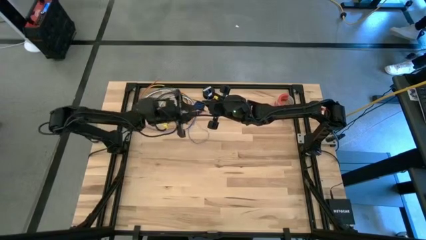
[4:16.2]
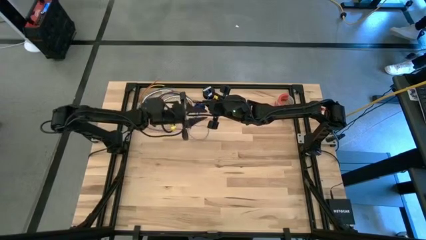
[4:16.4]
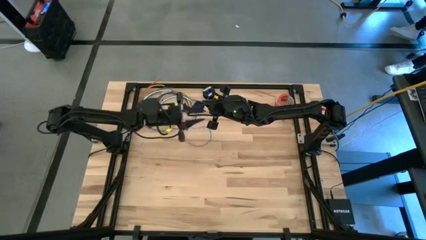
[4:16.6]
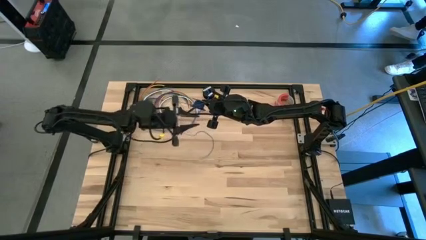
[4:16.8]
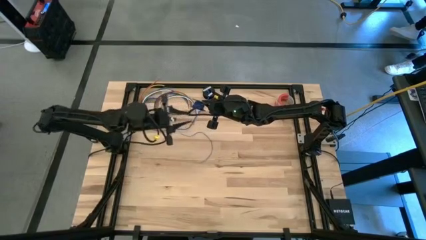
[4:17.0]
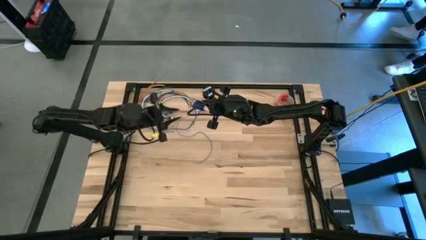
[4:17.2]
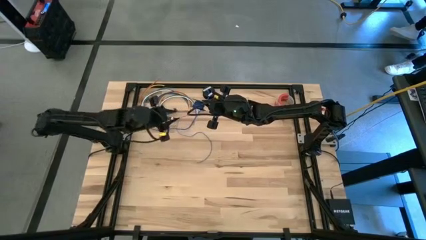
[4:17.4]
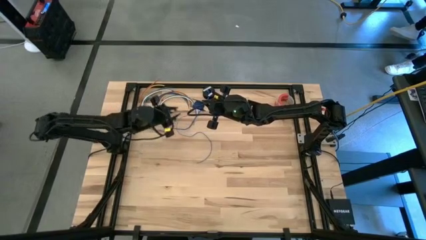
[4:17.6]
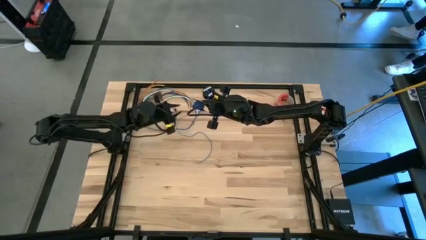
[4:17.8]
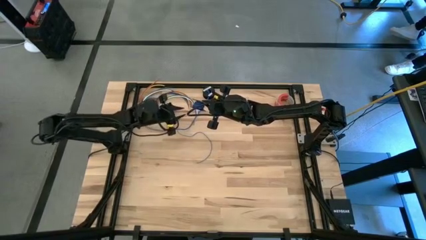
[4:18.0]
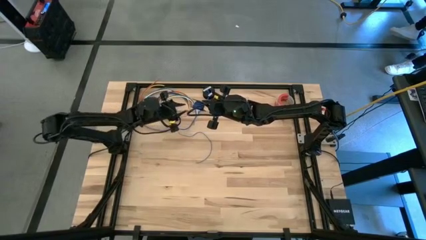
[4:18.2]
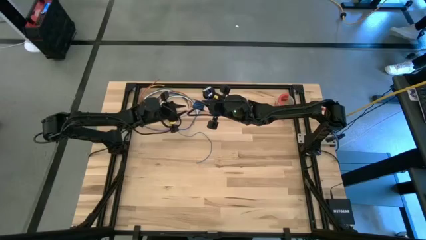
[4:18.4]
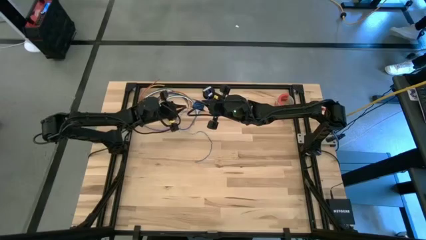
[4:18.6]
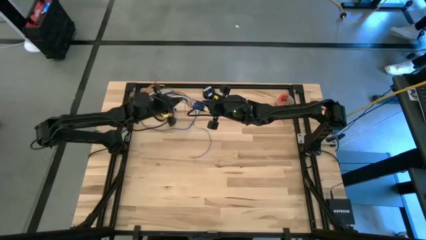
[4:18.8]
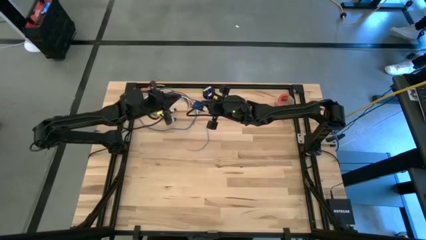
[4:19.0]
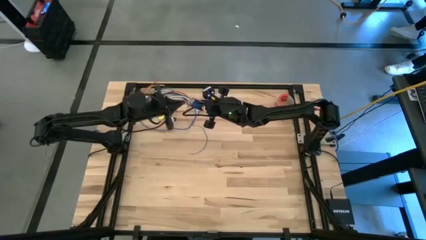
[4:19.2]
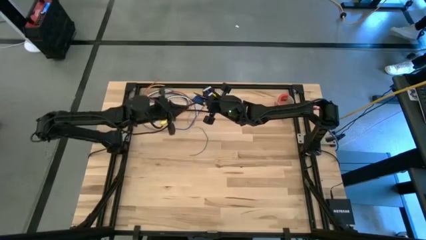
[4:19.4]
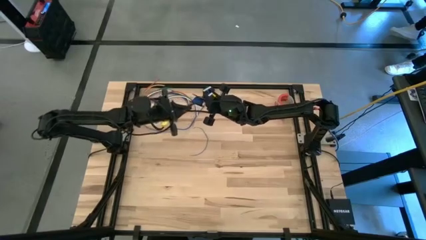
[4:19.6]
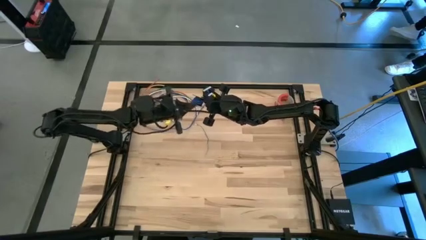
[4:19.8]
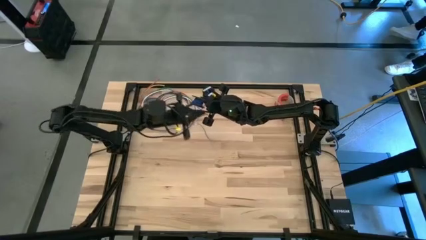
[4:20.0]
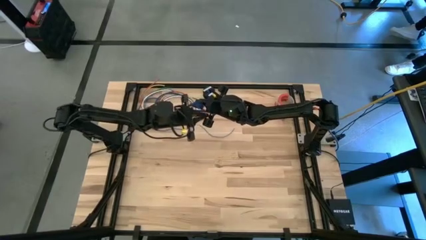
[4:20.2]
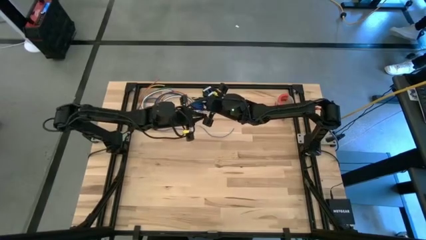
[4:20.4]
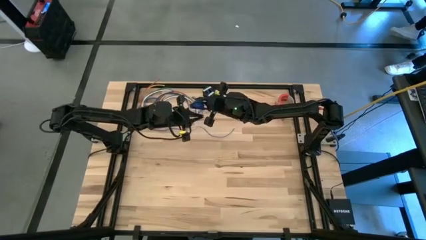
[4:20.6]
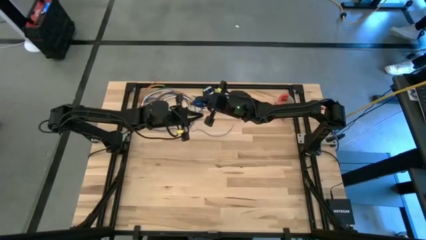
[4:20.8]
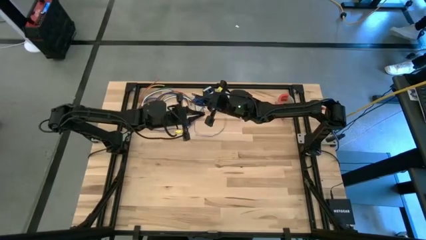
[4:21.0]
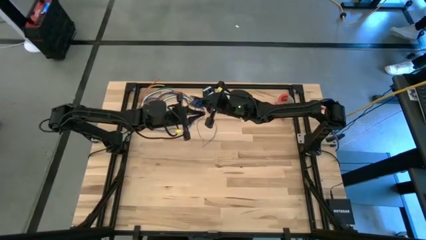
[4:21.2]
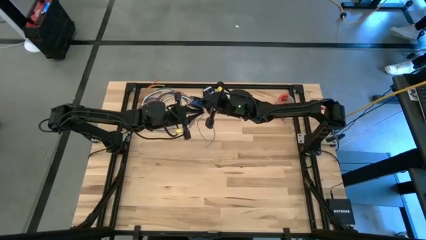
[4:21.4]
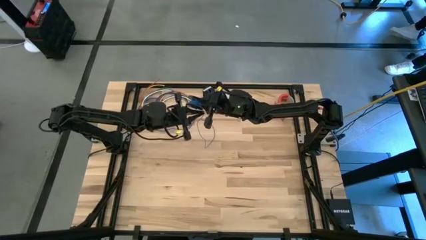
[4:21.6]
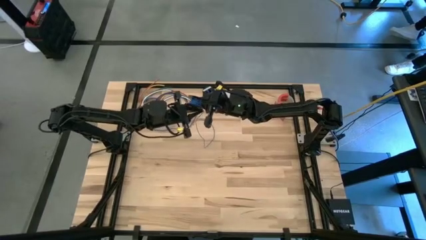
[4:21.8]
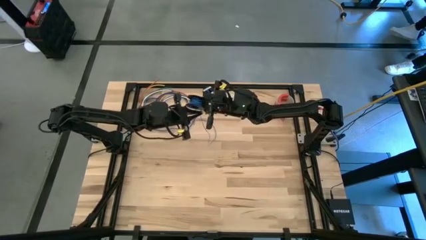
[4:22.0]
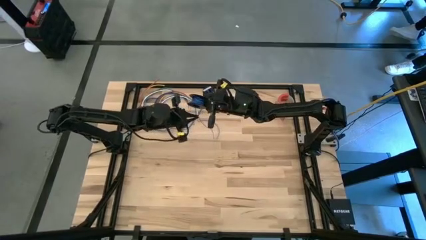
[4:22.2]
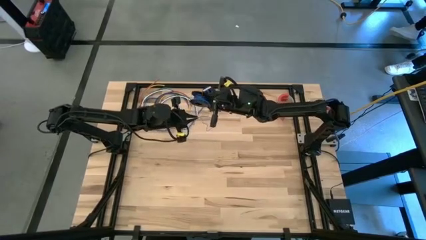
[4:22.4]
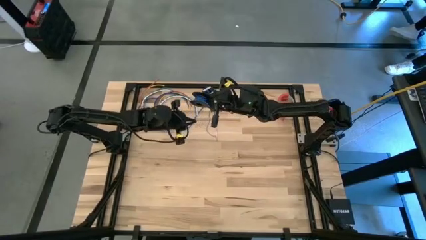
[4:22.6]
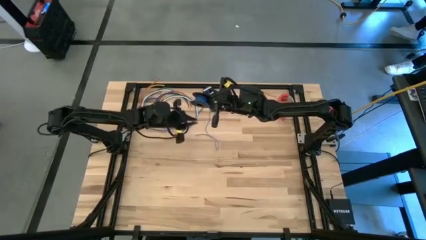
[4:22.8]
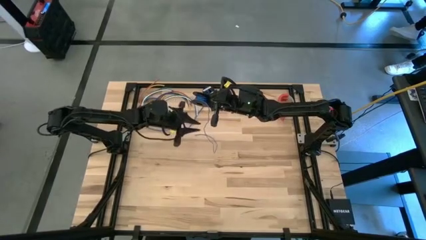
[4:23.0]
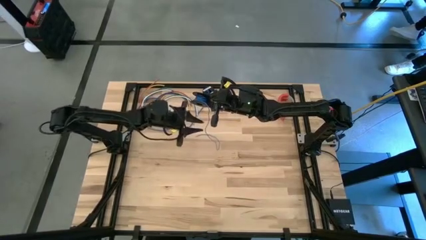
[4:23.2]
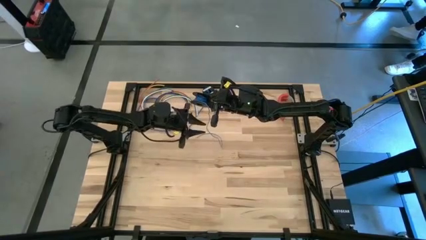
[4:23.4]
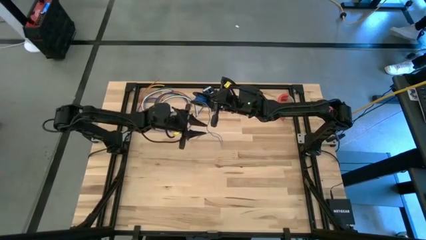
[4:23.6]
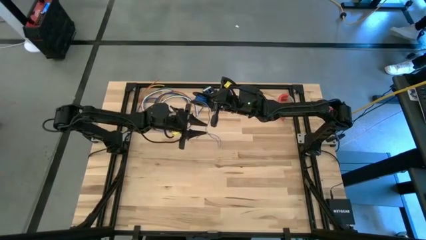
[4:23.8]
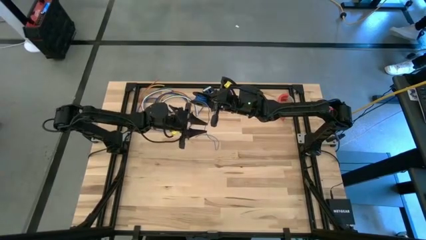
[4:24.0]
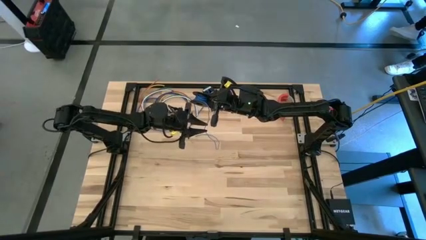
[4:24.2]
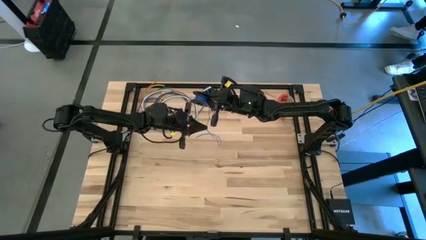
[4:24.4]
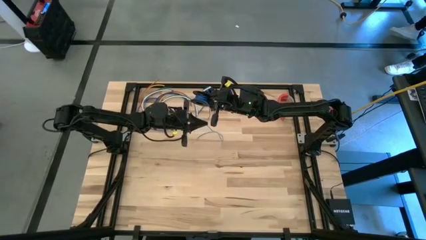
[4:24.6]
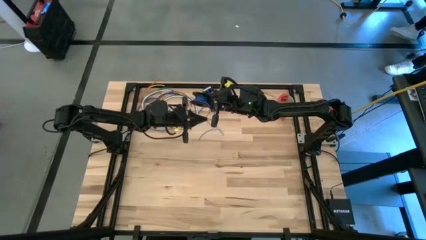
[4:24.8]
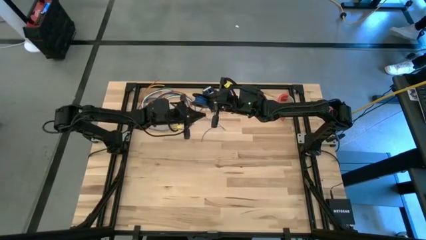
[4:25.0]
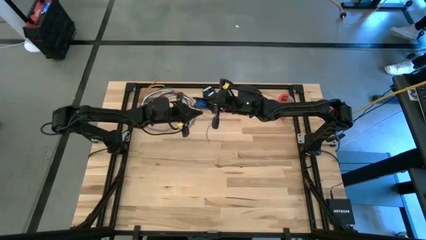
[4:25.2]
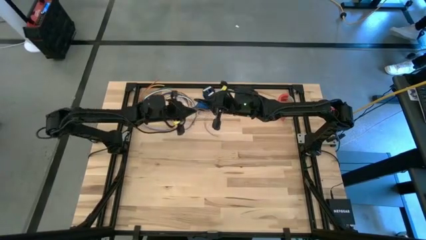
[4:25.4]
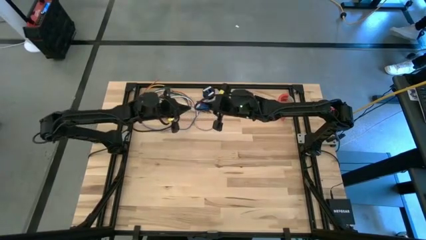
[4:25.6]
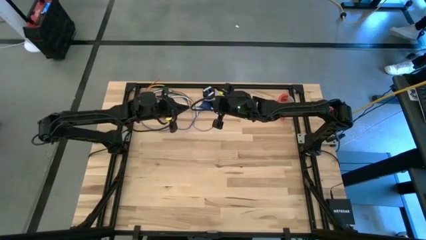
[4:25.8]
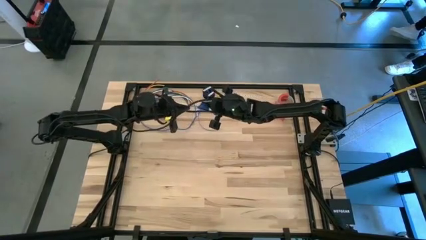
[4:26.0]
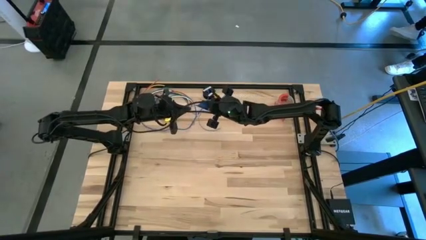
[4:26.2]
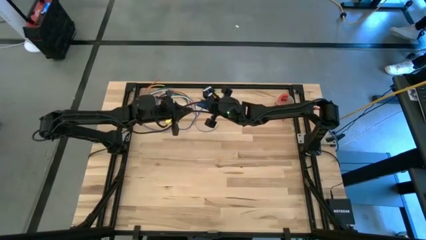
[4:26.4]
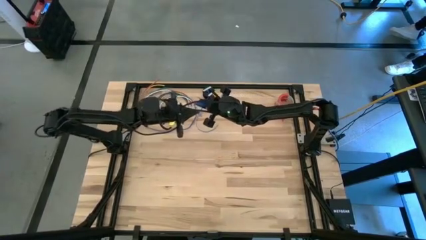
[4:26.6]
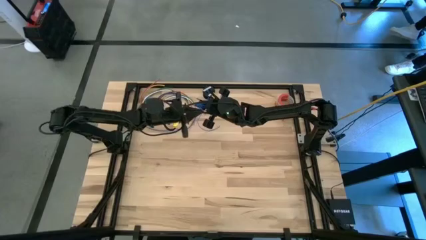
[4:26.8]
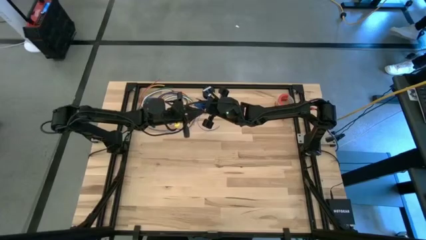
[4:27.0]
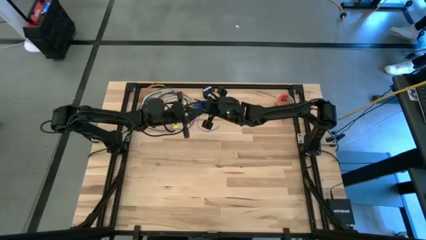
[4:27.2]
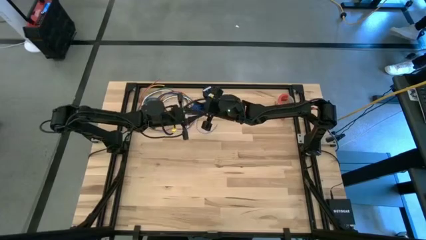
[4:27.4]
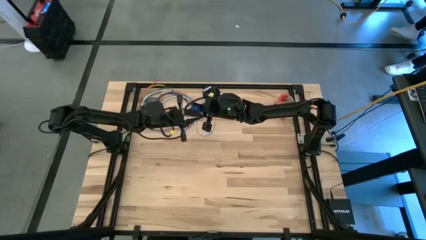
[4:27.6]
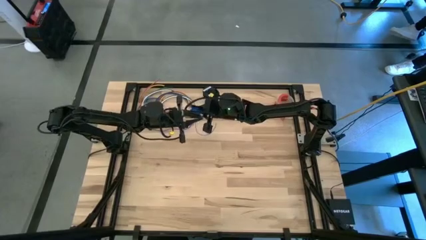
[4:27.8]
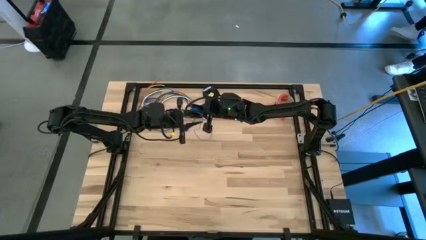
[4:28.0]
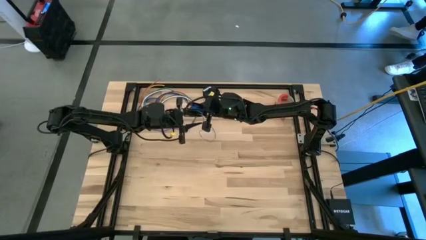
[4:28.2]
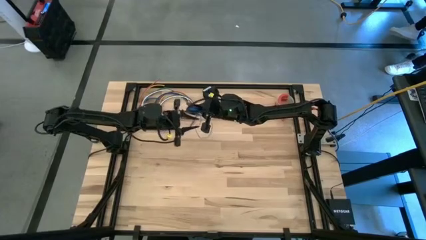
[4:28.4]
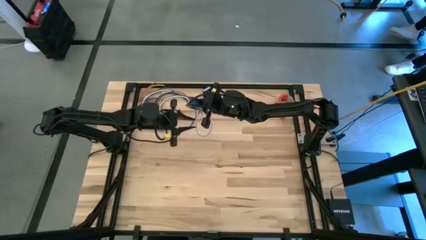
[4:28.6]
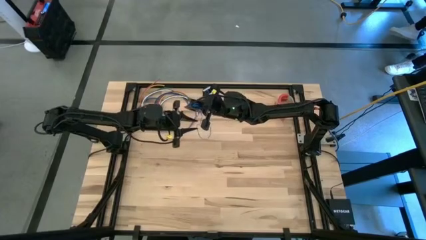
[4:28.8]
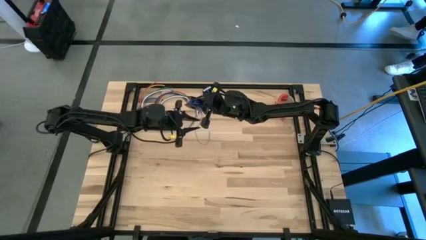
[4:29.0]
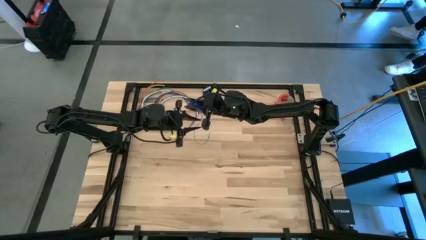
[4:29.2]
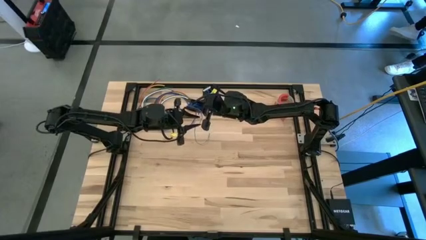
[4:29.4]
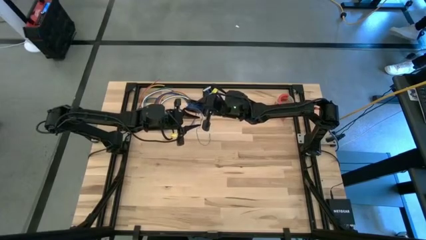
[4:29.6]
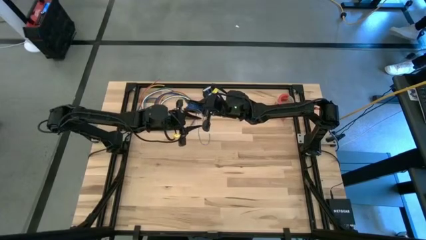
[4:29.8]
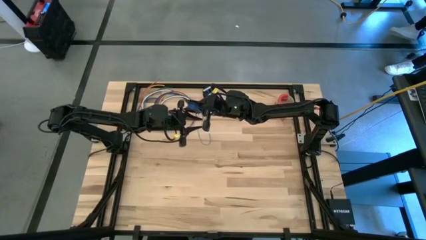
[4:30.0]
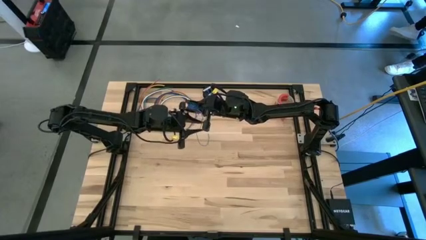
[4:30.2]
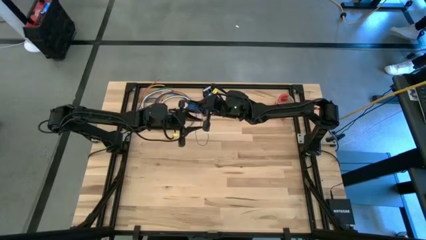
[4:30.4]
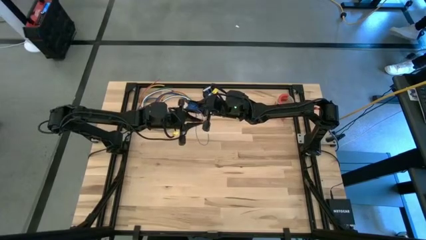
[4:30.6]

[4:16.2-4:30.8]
Task: Coil cords
Coil the blue wire onto the black spool

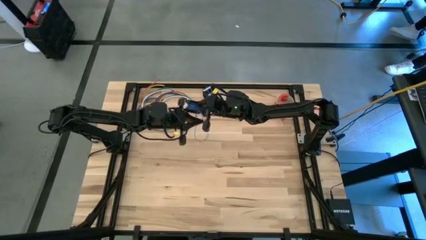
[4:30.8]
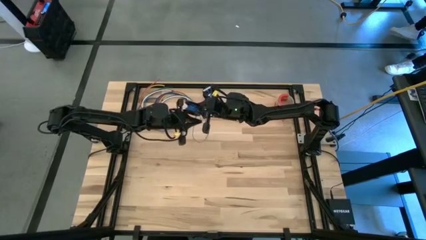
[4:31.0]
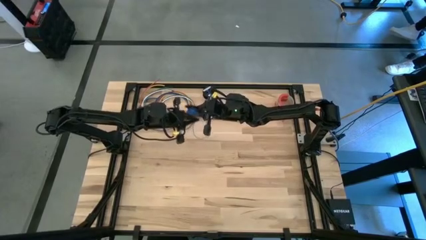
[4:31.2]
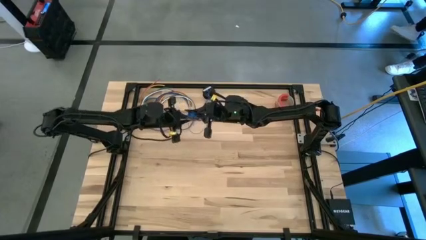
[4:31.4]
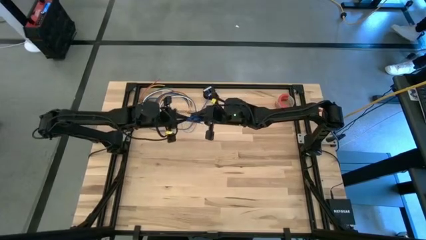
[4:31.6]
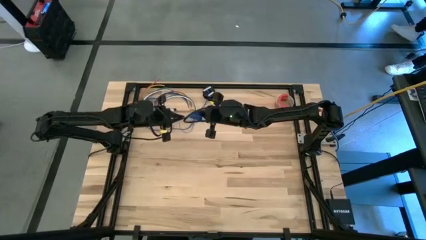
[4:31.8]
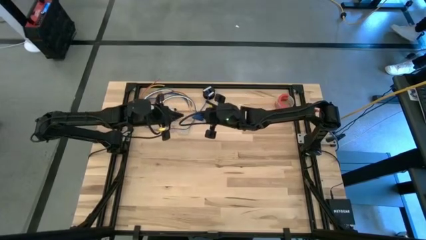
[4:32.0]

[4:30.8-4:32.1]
Coil the blue wire onto the black spool

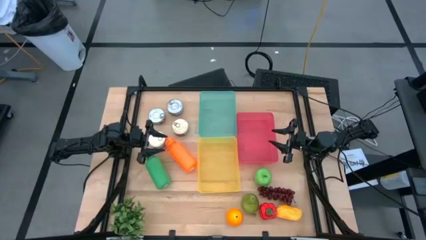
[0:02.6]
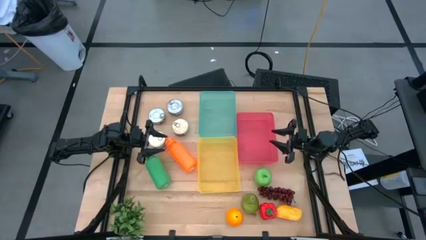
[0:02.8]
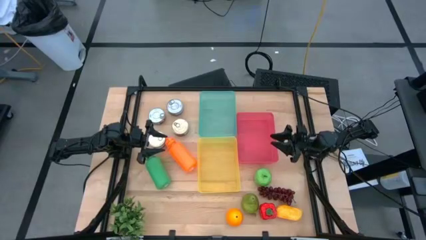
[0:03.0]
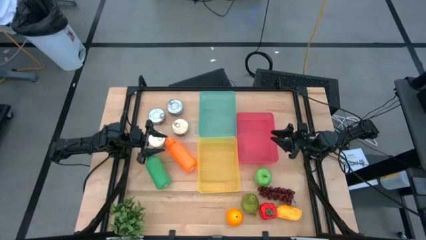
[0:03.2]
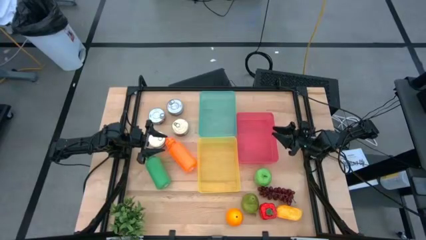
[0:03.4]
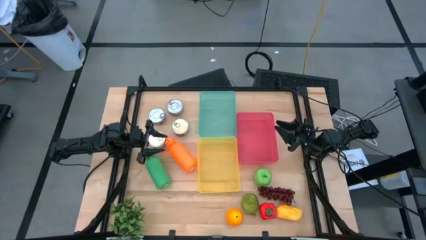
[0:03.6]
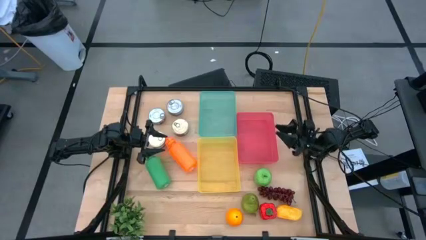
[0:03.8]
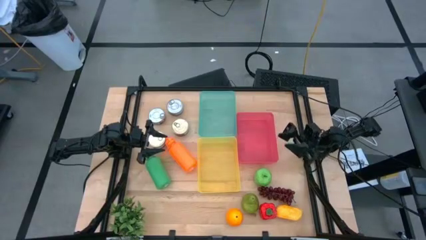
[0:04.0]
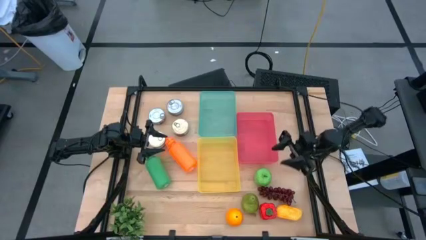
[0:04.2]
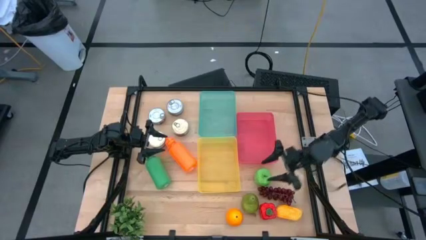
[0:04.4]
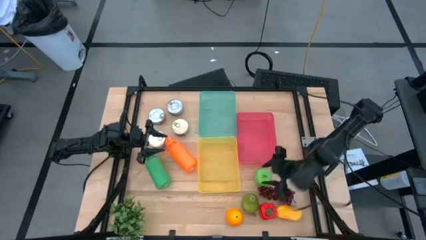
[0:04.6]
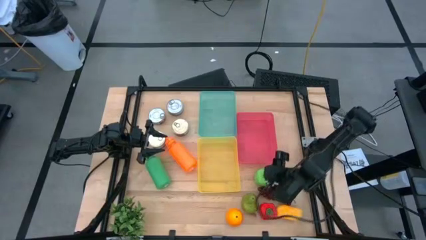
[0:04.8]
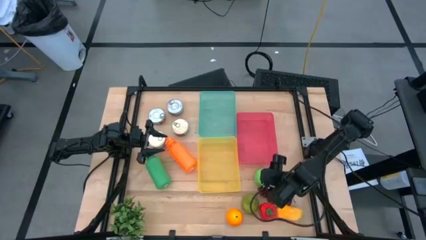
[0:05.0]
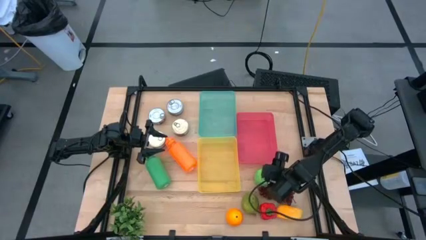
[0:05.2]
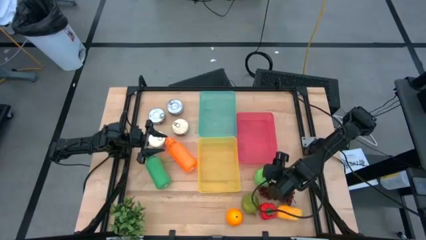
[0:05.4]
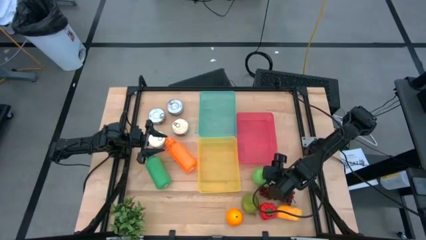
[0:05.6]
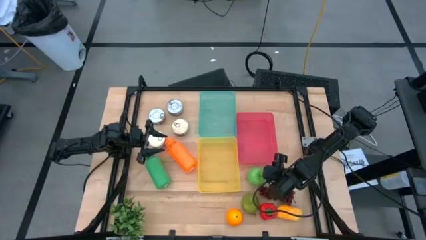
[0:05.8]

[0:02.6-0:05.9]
Task: Pick & Place Food Item
Put the green apple into the red bin
